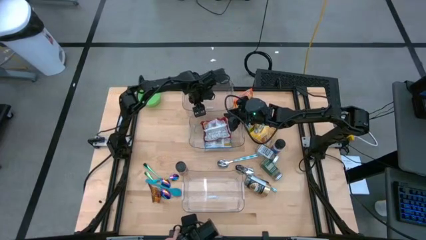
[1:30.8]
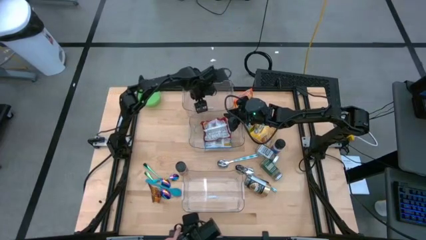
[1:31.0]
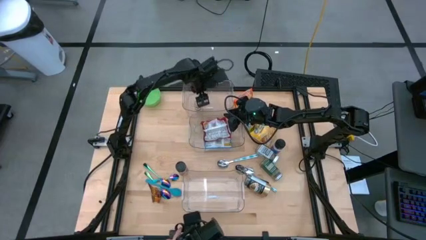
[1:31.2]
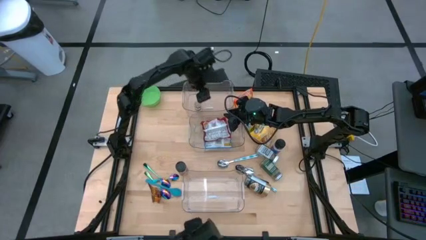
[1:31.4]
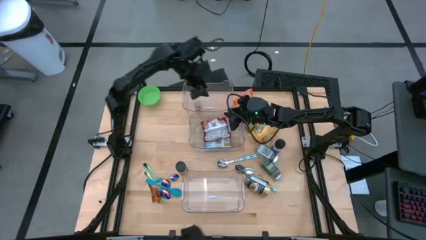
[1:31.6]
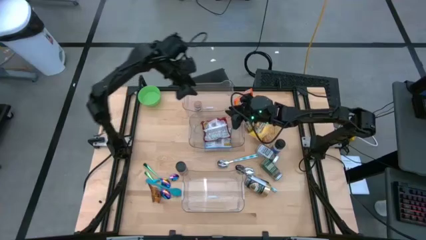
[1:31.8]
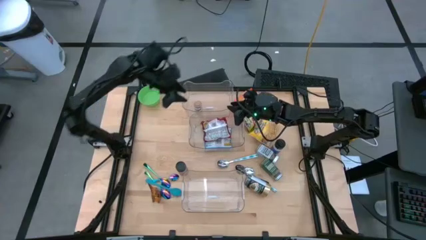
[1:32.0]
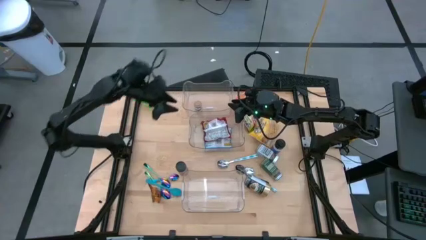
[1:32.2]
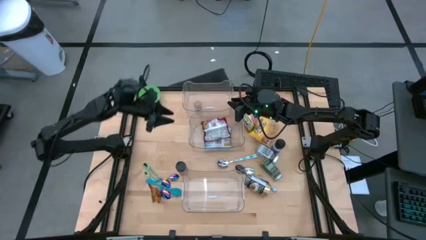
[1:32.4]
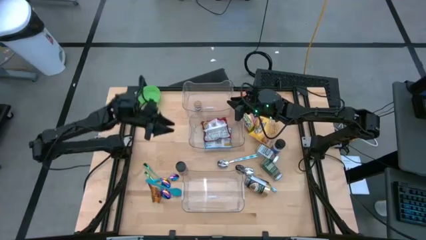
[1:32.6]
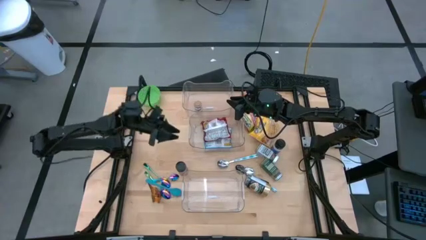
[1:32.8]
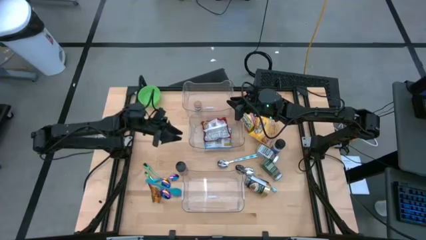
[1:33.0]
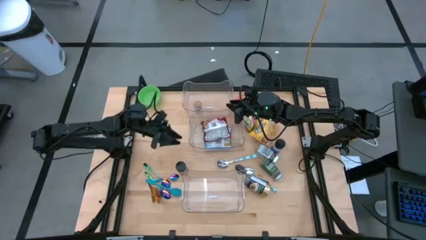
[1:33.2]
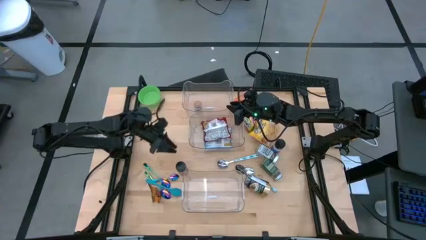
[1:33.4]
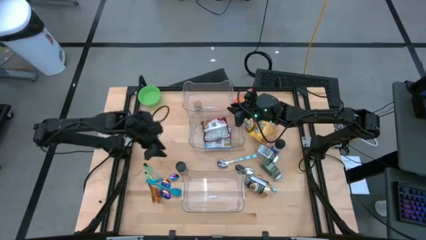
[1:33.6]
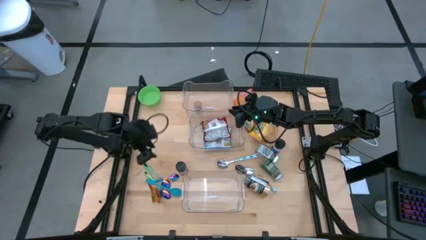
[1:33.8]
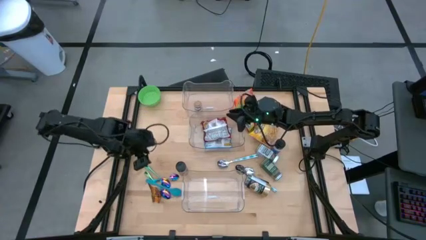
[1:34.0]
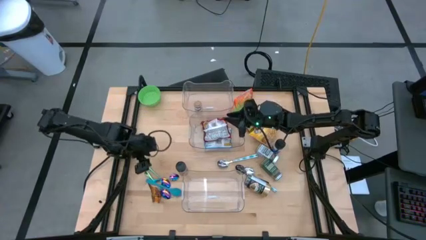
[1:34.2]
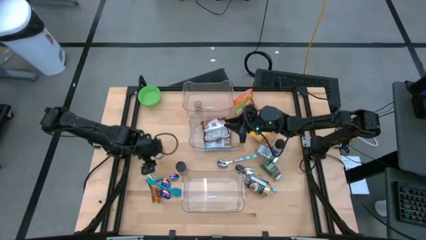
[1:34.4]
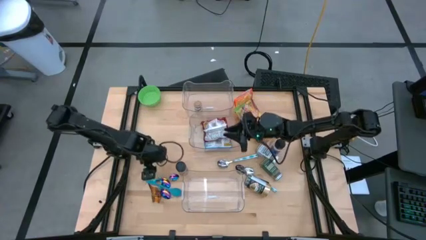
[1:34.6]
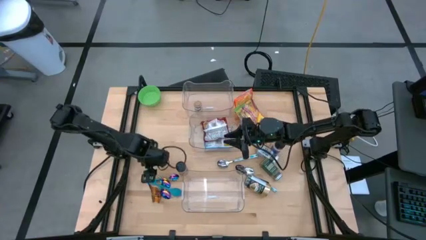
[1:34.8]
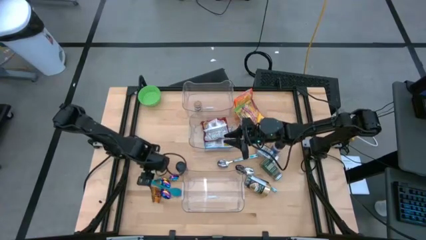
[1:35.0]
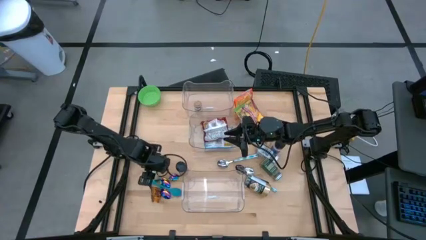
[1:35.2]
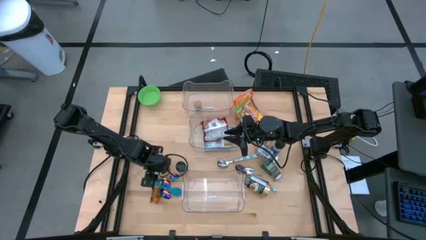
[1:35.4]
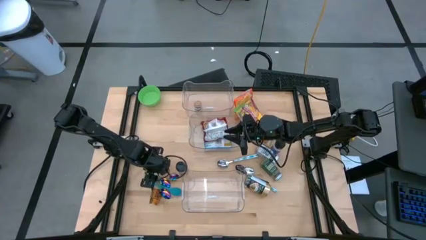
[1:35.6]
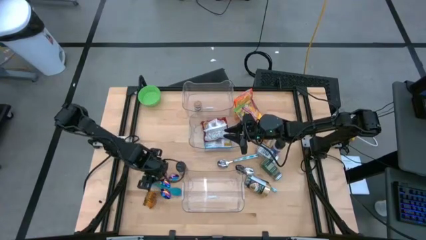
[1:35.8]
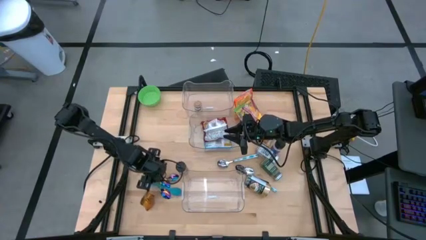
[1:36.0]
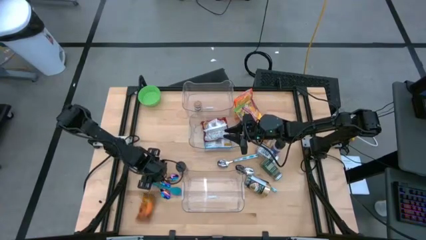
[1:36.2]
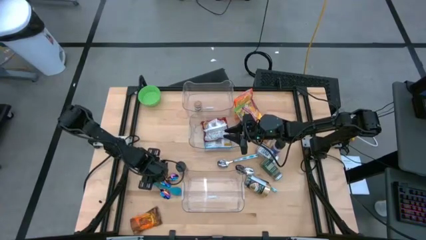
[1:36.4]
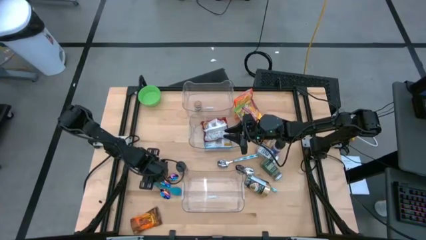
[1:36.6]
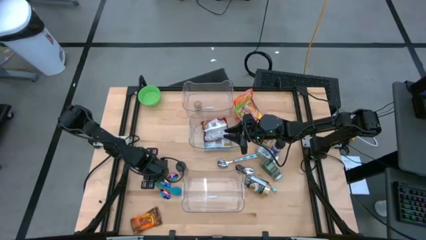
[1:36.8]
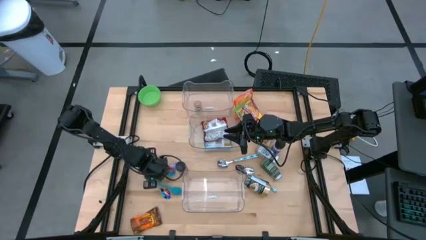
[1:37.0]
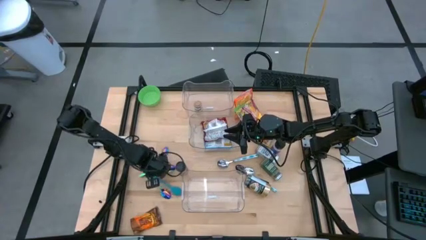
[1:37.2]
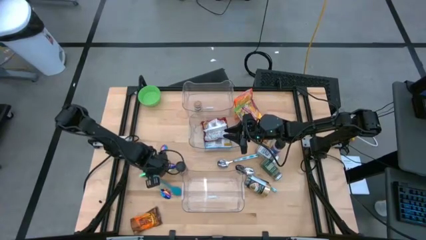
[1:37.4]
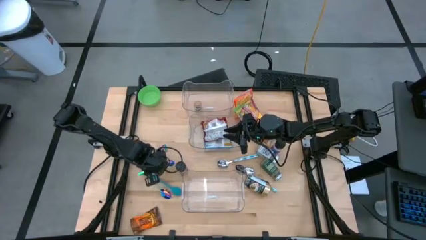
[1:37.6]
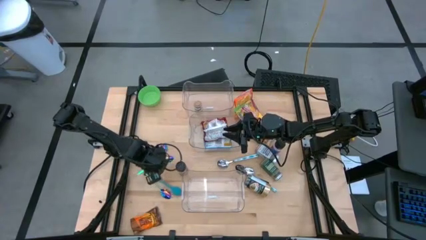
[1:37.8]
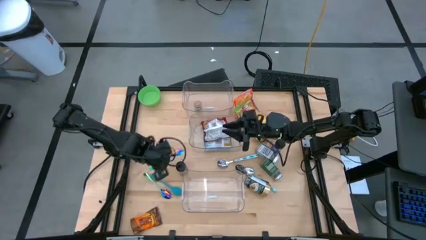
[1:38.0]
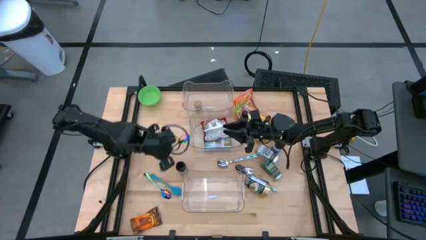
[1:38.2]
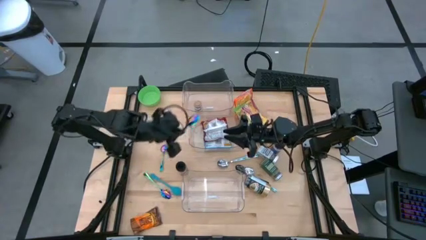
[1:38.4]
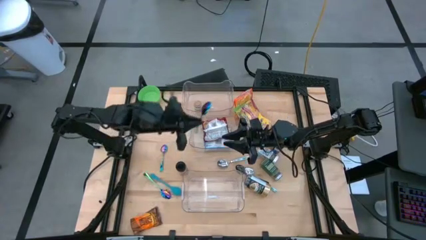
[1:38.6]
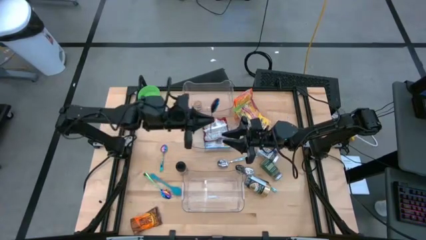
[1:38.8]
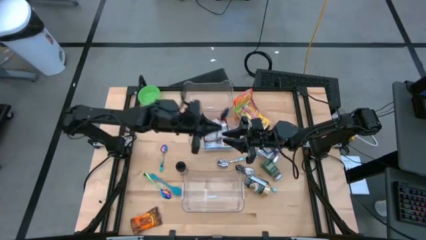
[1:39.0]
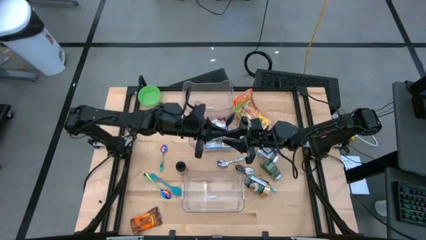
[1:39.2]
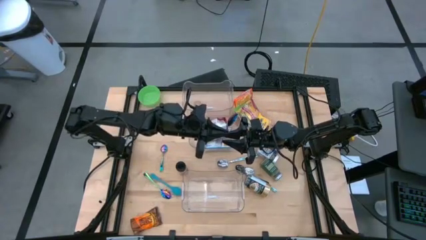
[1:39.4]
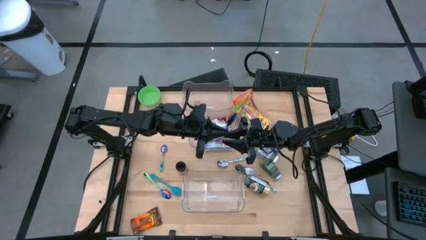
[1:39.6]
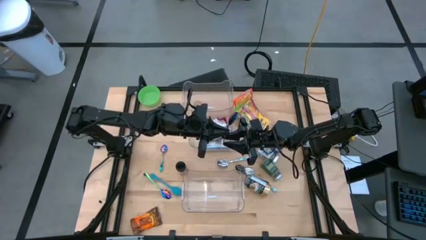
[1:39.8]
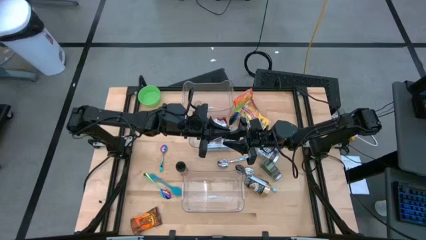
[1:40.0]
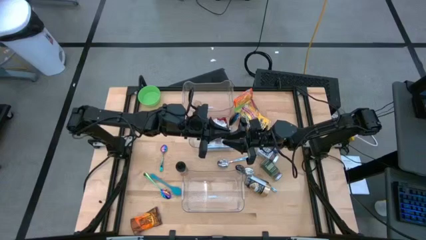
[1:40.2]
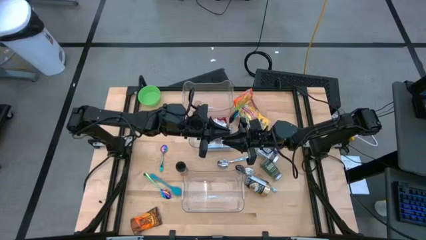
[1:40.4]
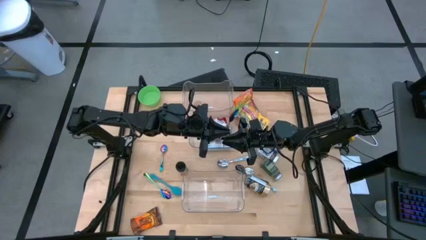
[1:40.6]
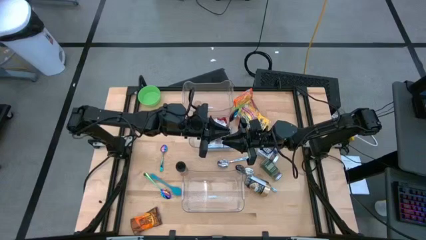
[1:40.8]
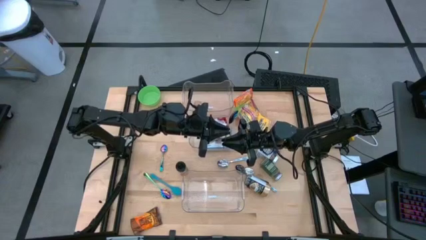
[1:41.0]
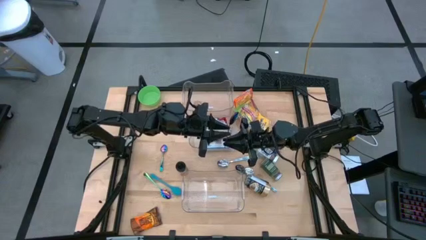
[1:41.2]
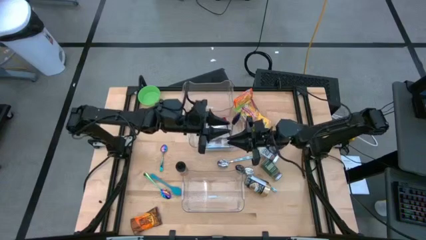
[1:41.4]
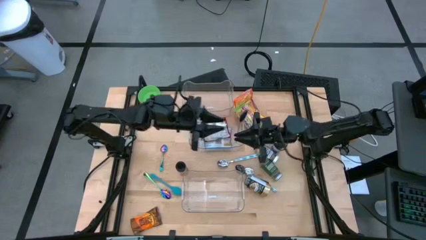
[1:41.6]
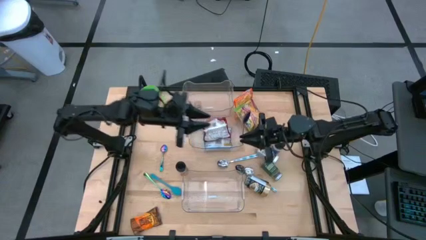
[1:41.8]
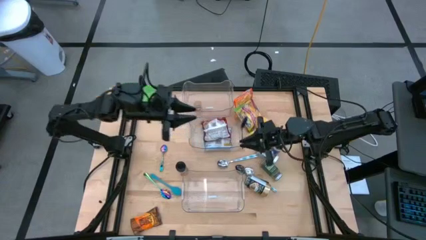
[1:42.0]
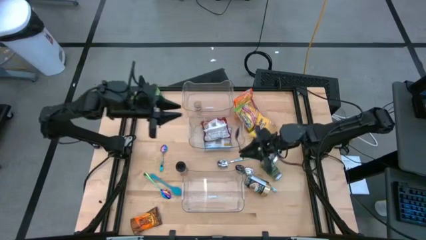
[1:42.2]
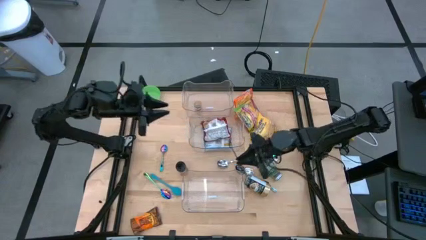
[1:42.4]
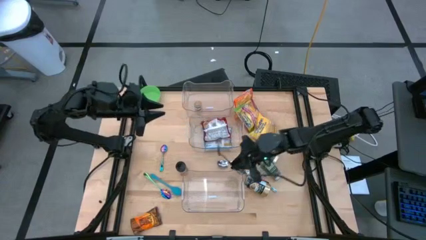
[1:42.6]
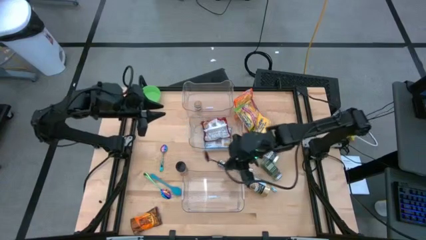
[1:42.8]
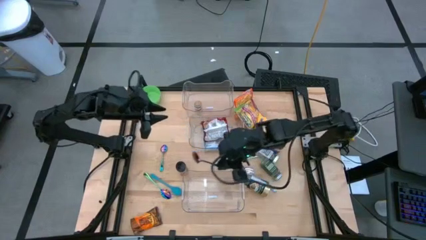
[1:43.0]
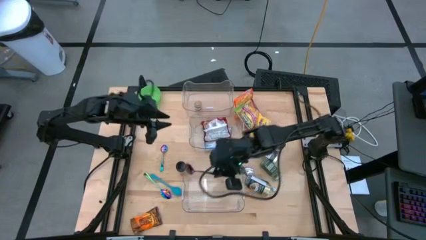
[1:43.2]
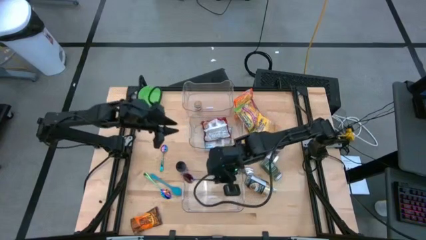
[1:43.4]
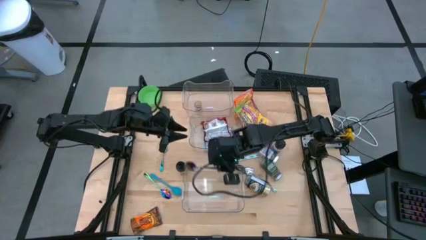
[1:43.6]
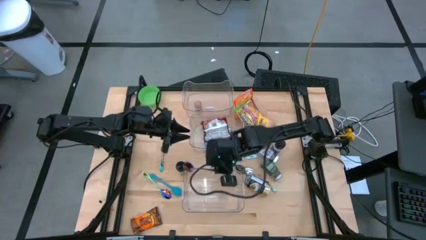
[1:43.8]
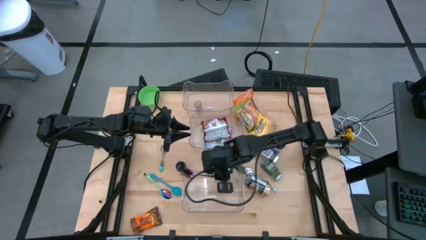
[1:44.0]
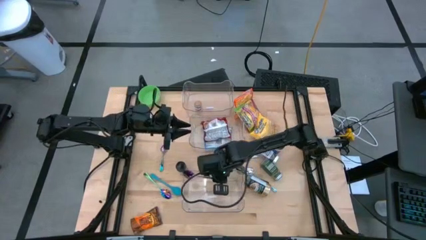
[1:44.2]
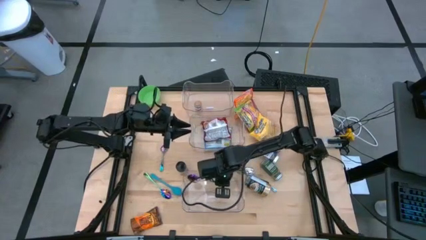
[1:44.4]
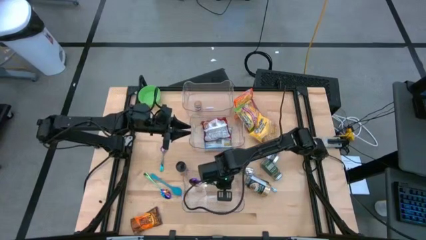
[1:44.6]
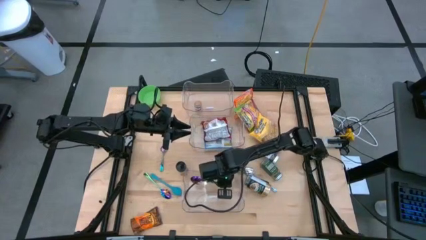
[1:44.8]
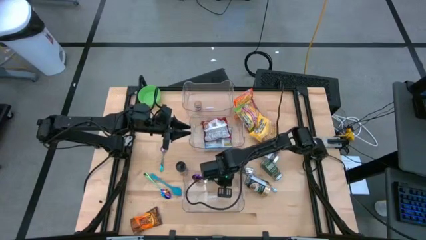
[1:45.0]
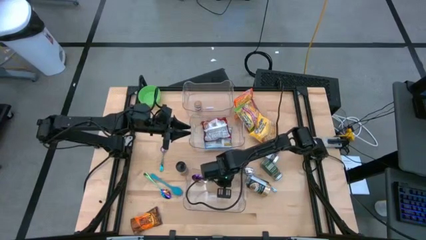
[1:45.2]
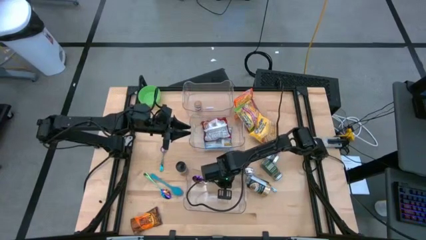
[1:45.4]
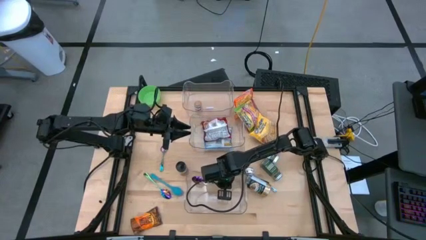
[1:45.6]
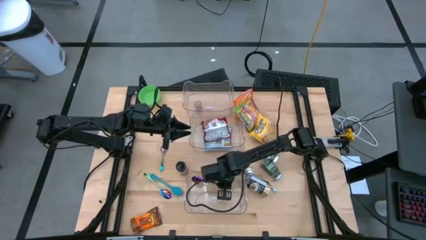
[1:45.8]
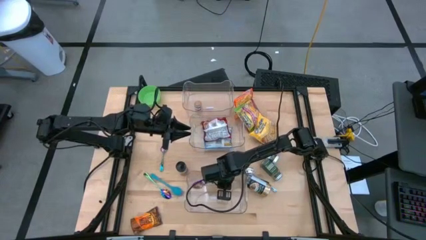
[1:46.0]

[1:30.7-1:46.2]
Task: Pick & Place Food Item
Put the middle purple spoon into the bottom transparent bin
